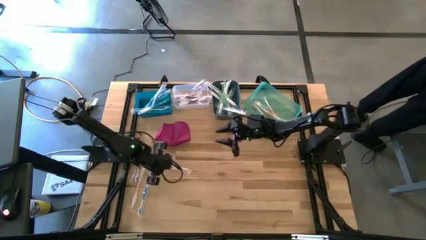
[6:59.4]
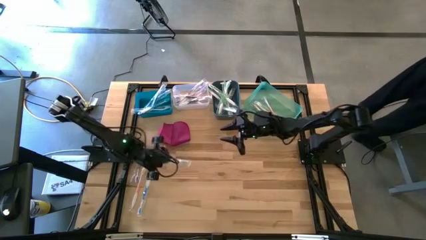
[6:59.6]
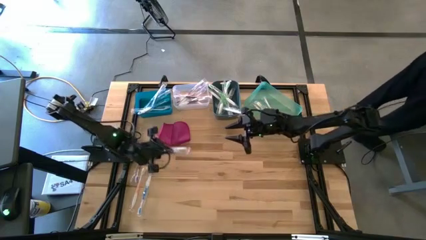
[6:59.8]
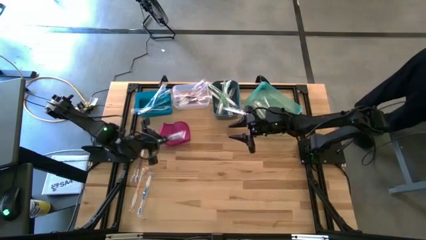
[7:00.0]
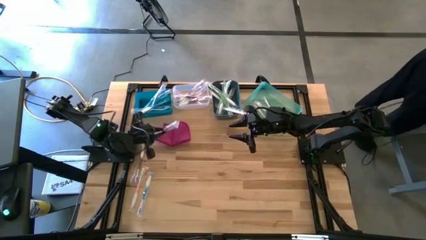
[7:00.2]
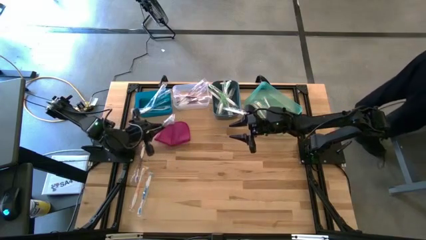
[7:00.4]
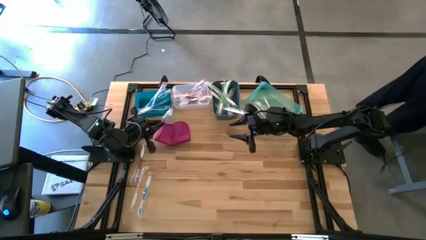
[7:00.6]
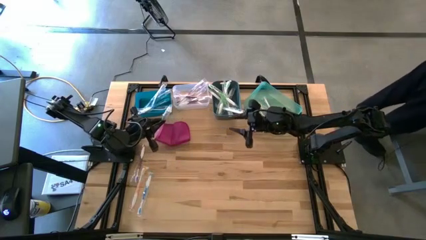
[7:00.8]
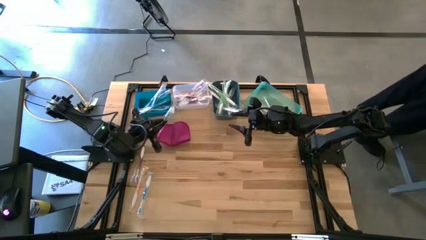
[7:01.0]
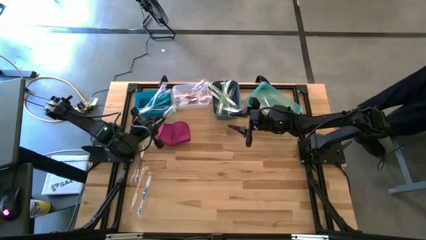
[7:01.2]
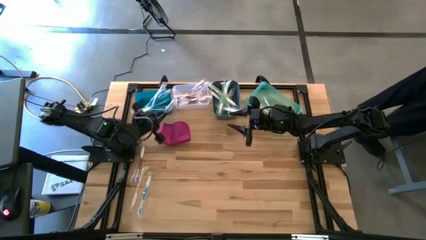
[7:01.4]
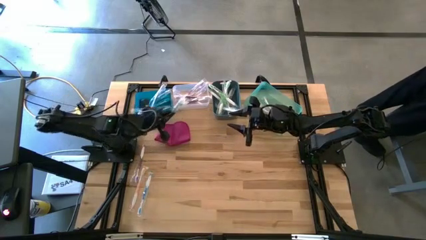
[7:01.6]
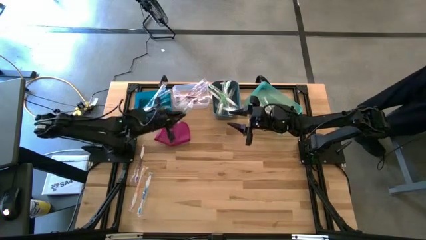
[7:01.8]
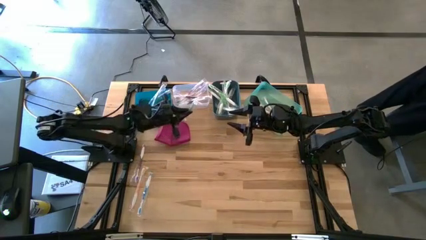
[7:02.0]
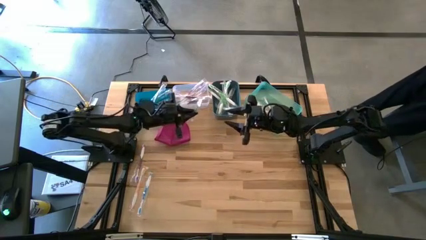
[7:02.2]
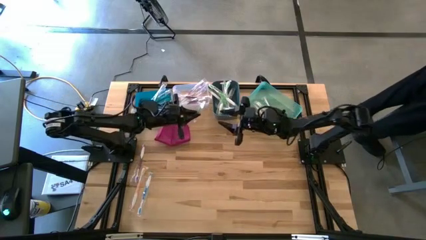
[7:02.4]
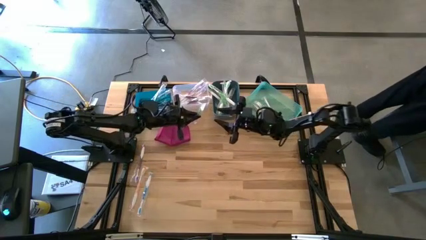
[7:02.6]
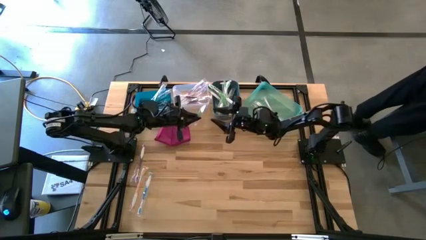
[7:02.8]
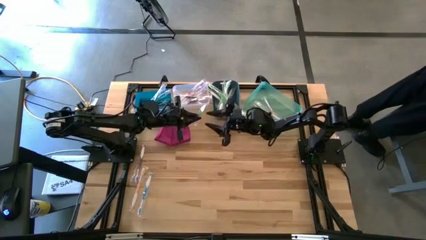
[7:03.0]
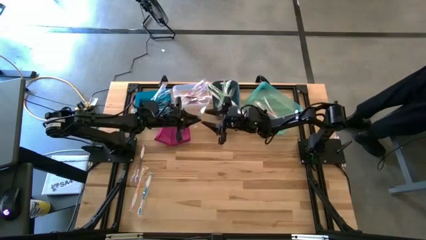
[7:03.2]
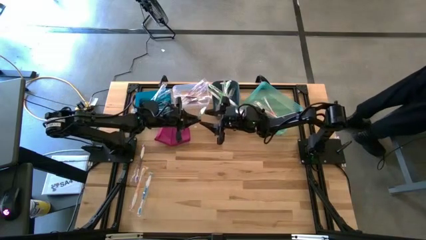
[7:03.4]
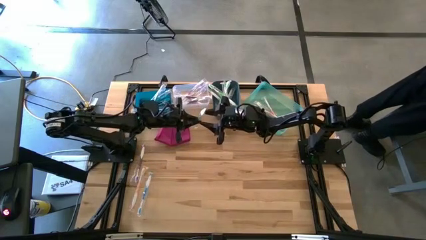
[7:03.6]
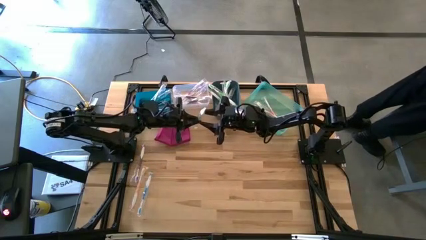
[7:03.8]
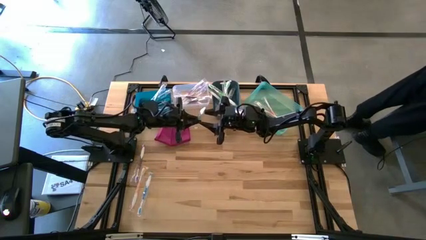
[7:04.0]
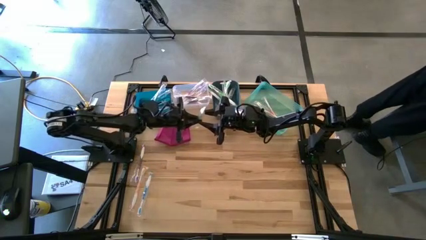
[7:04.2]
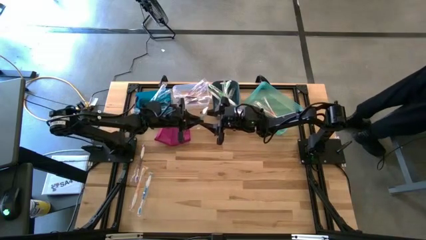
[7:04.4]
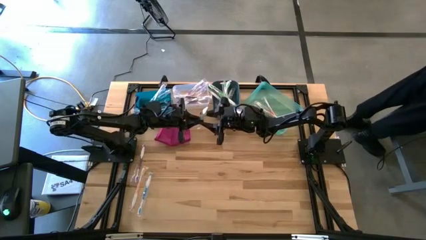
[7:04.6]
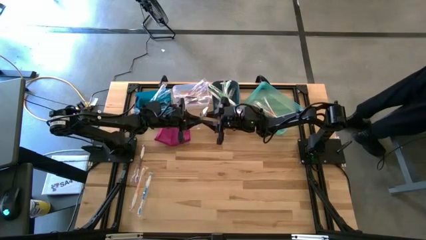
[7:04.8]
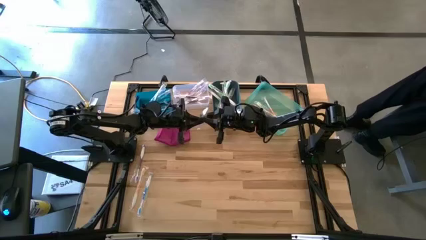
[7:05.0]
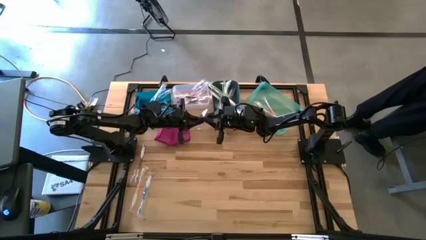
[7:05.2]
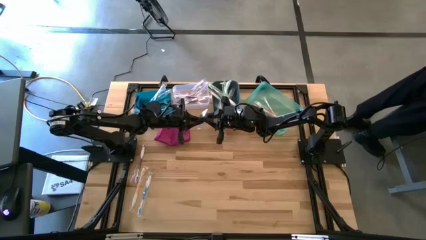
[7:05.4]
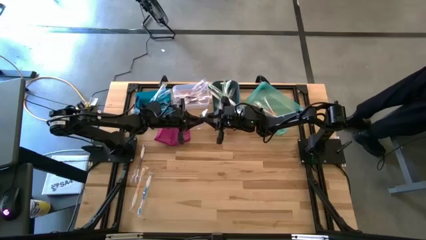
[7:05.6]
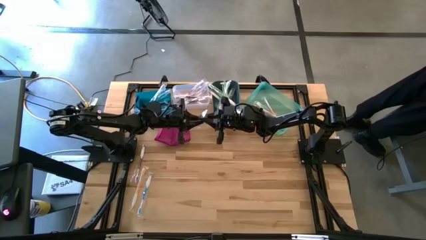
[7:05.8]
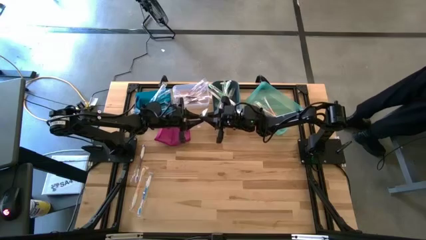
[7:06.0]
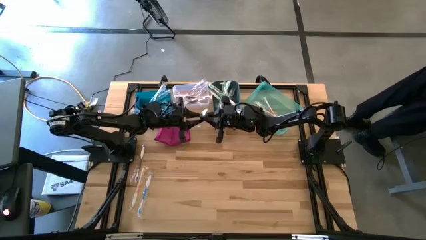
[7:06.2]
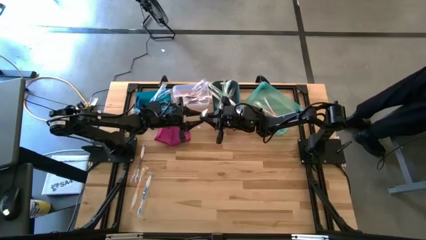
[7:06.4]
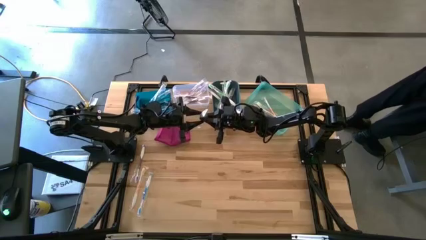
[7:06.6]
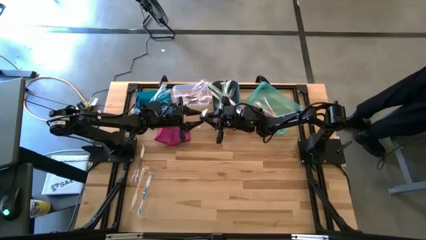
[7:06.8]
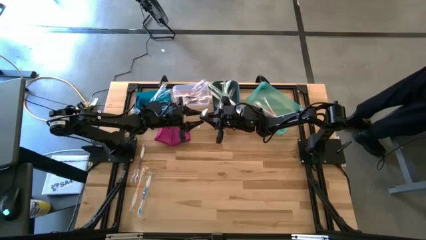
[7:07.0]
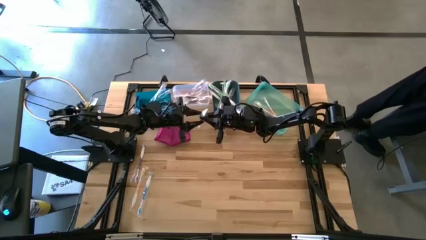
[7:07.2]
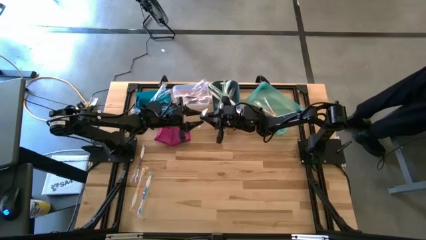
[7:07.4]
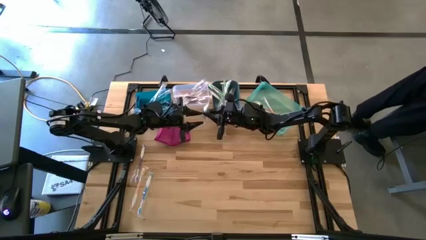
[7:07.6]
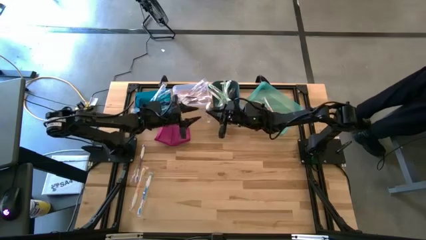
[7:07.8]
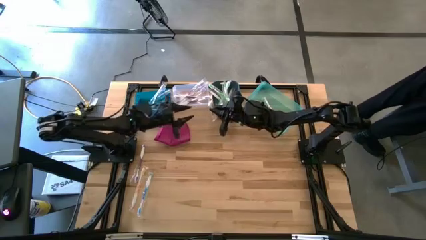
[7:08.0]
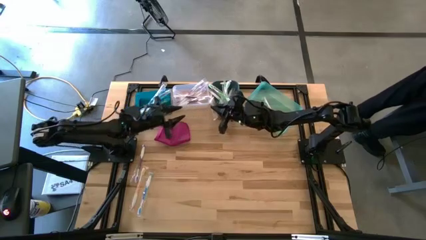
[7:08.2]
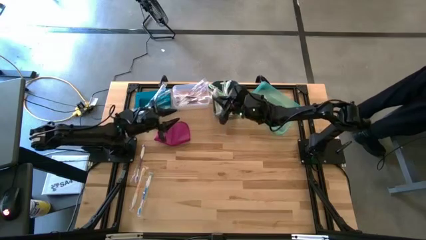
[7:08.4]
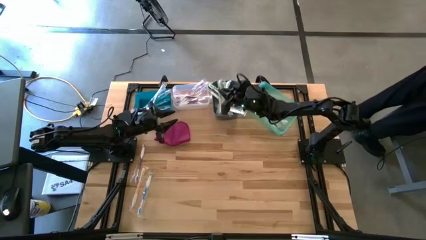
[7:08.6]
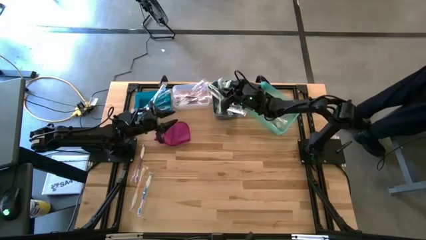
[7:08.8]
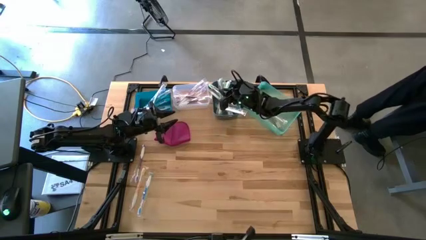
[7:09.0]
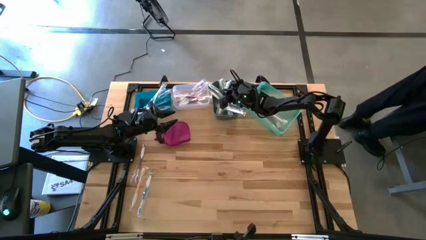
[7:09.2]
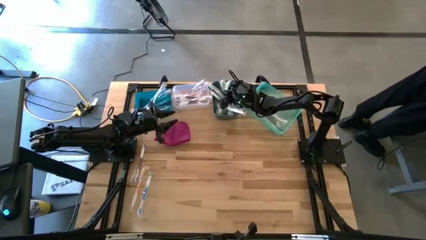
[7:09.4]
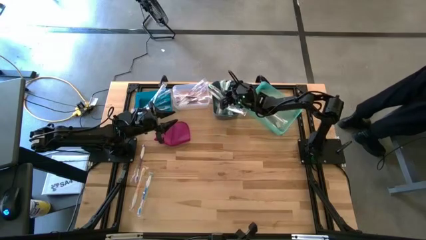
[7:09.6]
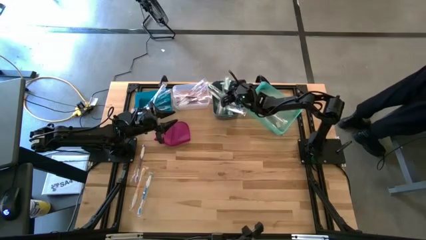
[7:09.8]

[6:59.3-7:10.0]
Task: Pick & Place Toothbrushes
Put the green toothbrush into the dark blue bin

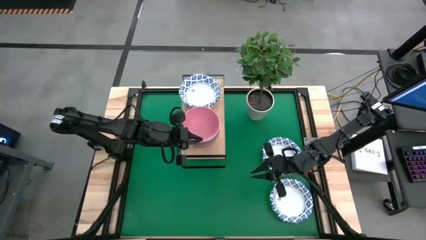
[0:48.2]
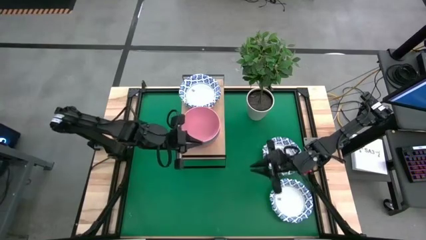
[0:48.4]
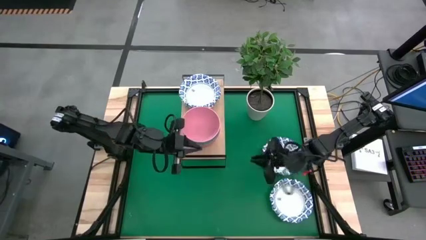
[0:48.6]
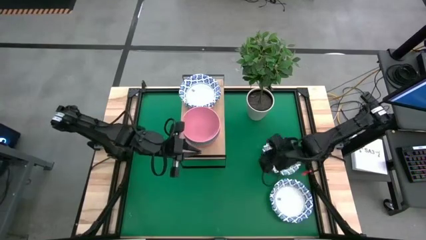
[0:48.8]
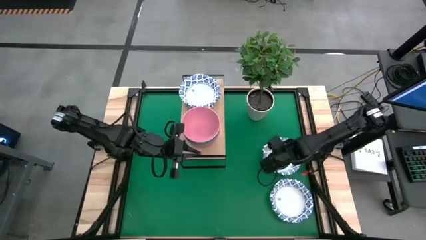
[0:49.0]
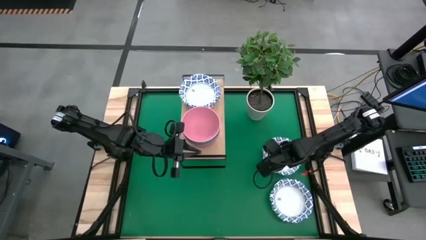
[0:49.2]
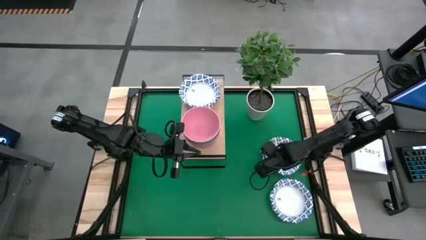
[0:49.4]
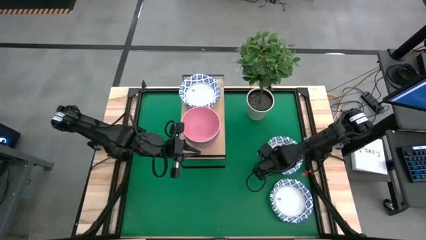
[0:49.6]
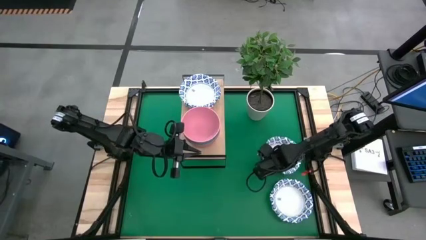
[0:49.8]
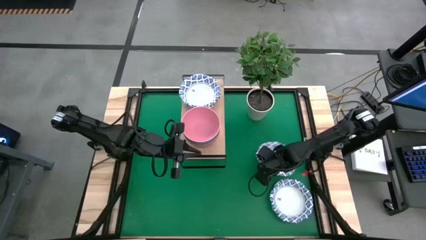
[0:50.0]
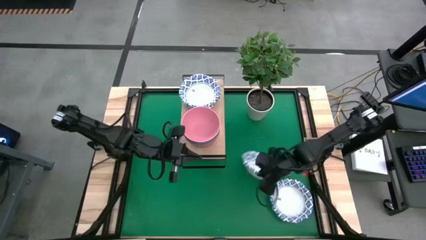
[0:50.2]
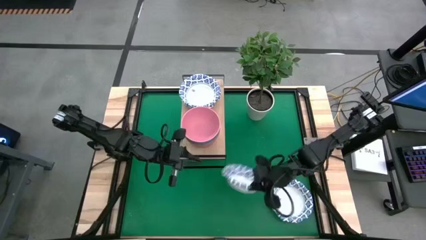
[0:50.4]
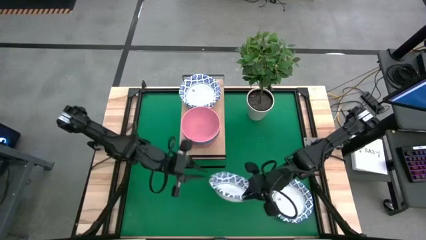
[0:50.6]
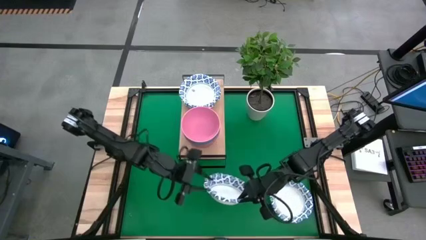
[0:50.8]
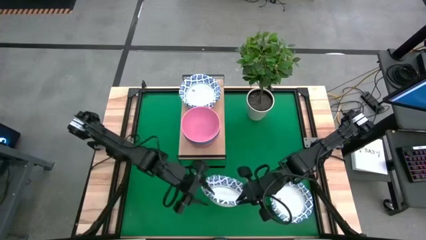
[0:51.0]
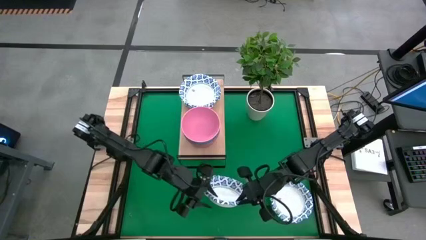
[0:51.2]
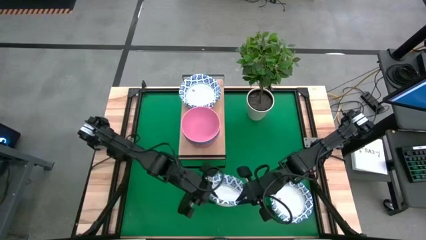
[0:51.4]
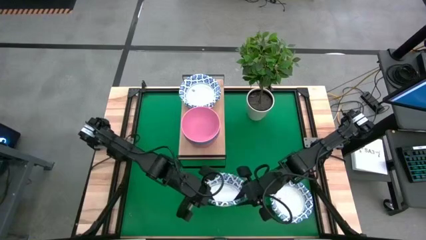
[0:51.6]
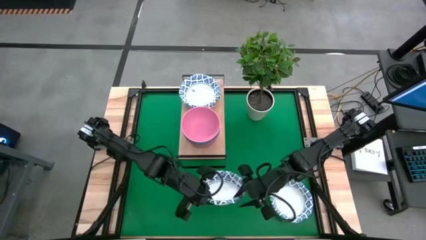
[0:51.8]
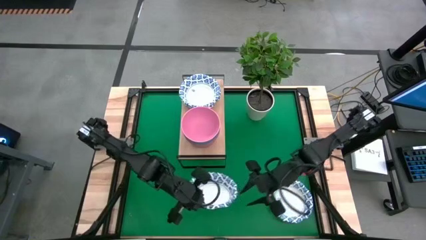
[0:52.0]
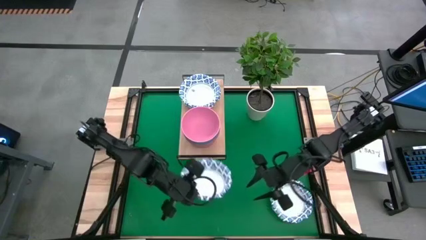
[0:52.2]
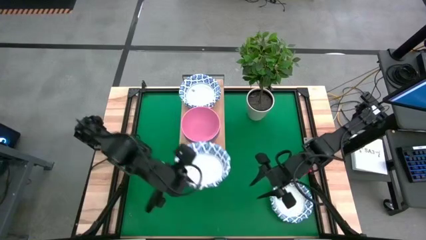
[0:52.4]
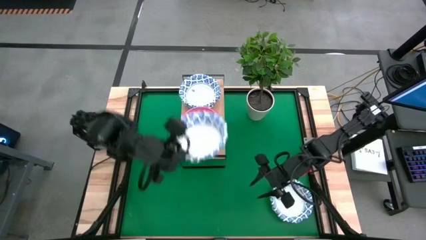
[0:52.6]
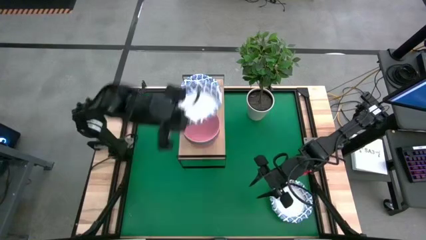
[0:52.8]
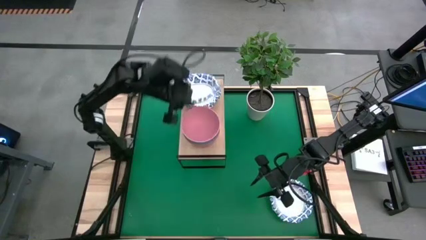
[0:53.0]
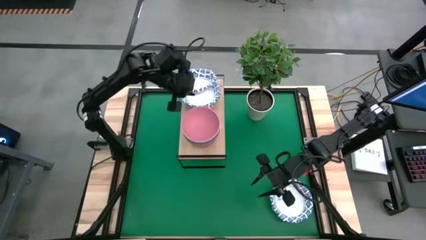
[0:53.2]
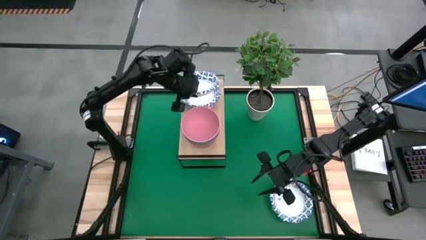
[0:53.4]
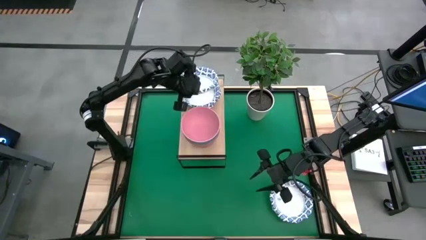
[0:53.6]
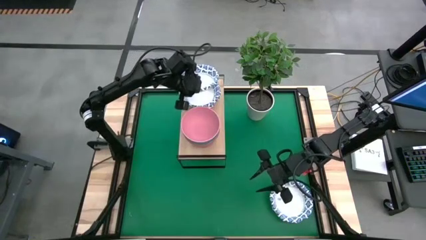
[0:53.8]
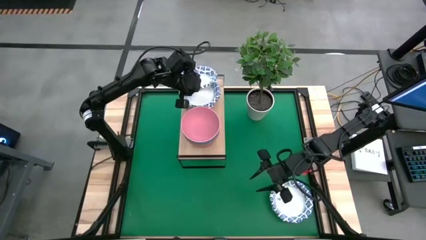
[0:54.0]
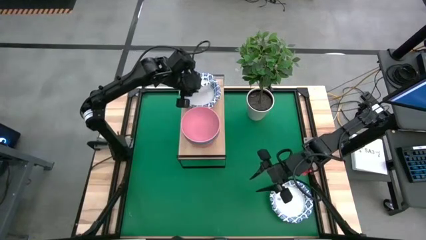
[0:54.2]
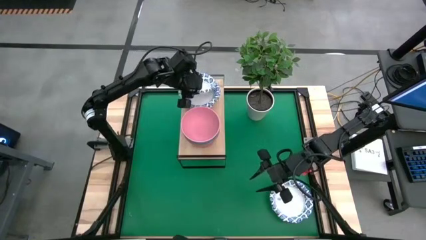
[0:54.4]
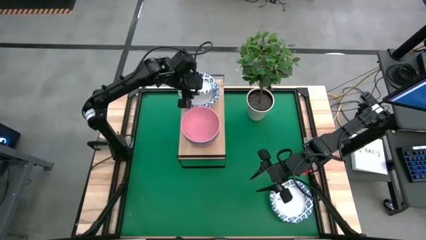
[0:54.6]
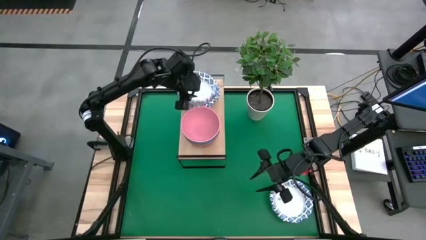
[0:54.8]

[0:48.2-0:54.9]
Task: Place and stack bowls onto a shelf
Stack the white patterned bowl on top of the other white patterned bowl on the shelf
